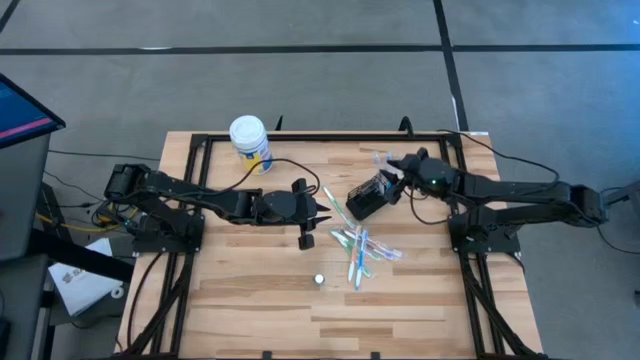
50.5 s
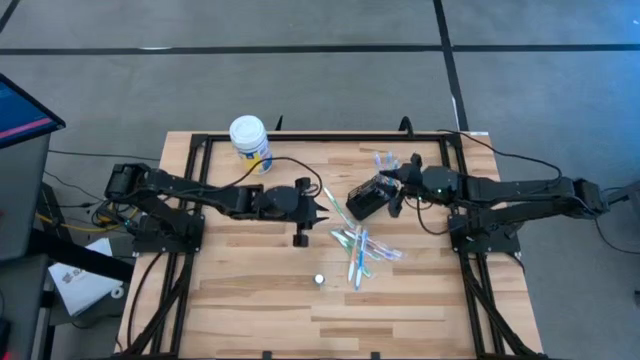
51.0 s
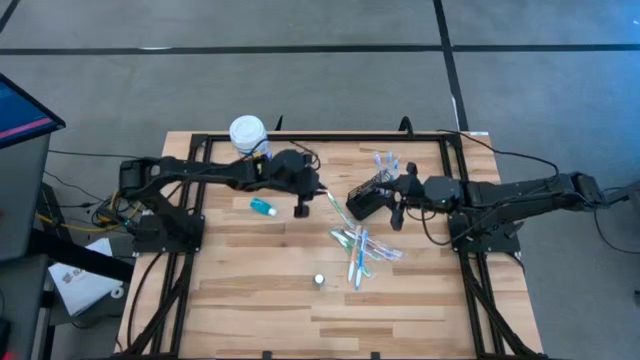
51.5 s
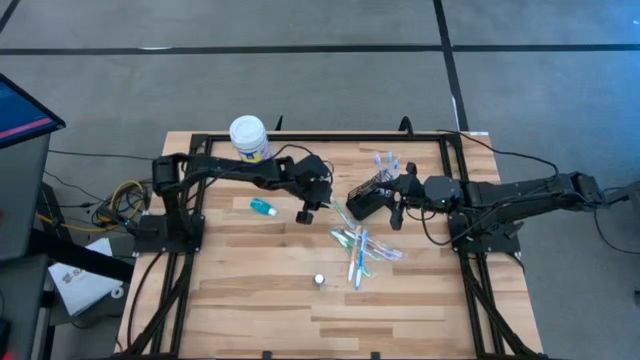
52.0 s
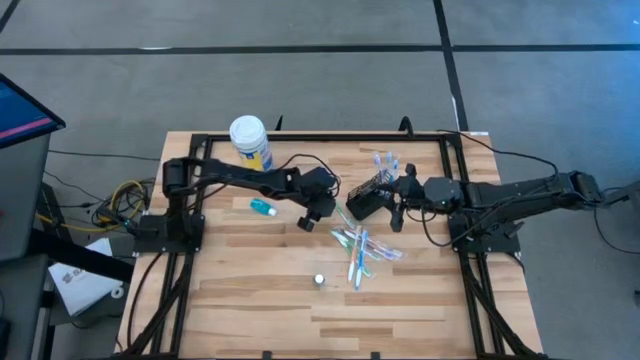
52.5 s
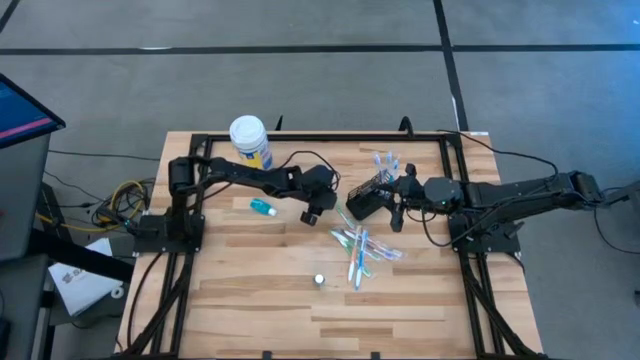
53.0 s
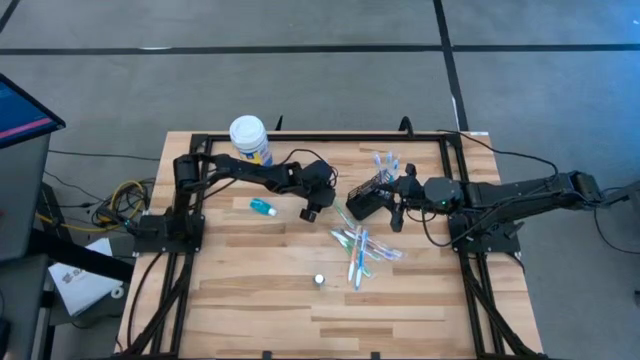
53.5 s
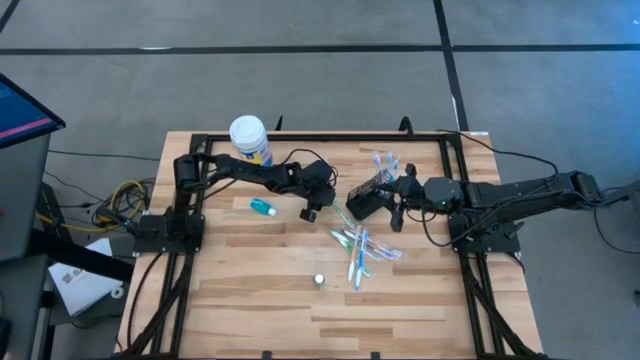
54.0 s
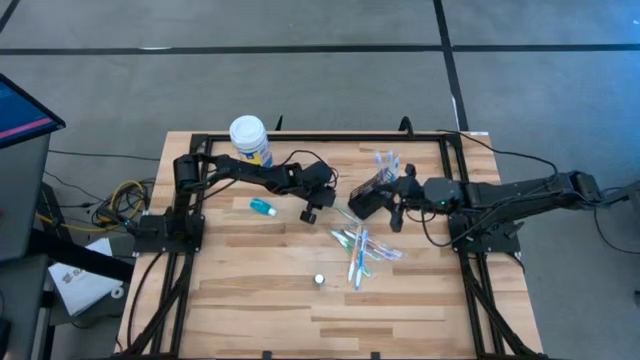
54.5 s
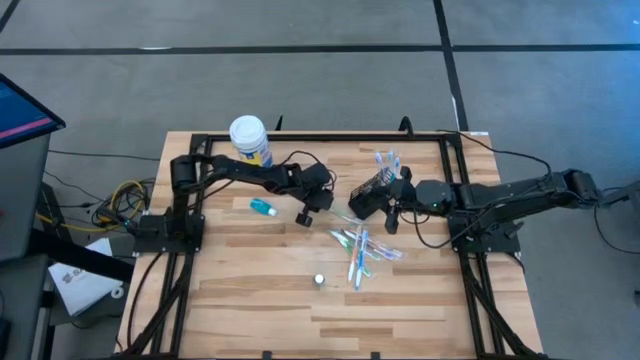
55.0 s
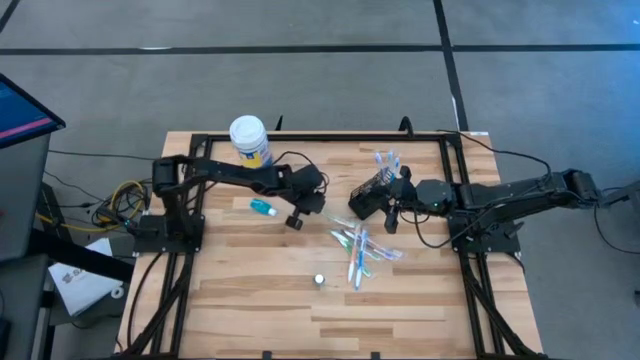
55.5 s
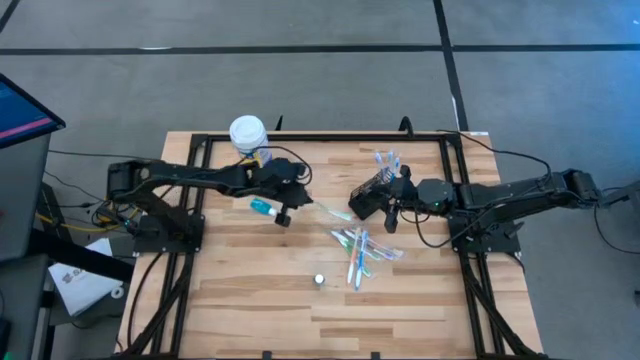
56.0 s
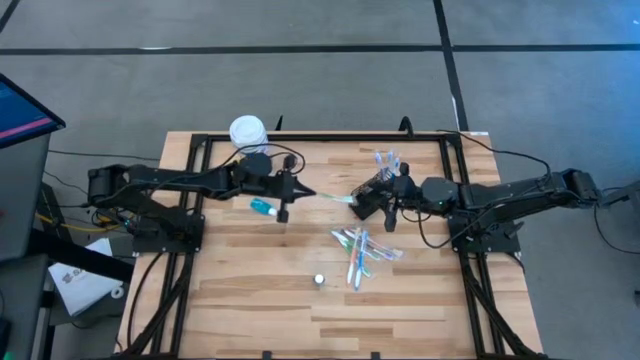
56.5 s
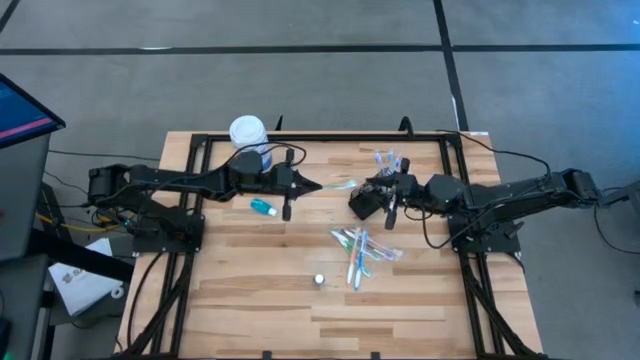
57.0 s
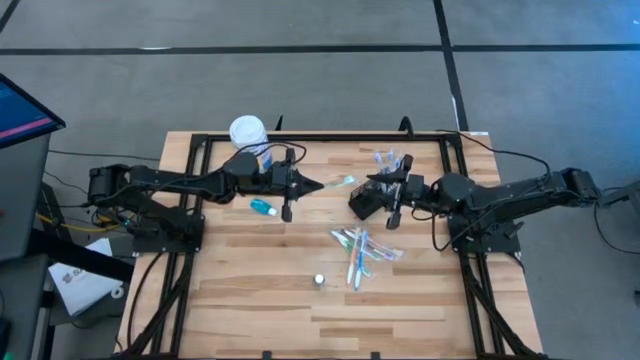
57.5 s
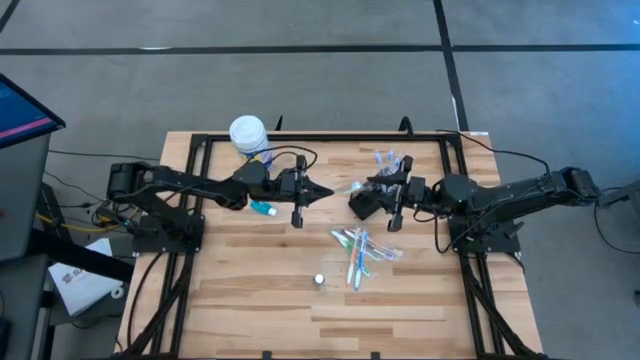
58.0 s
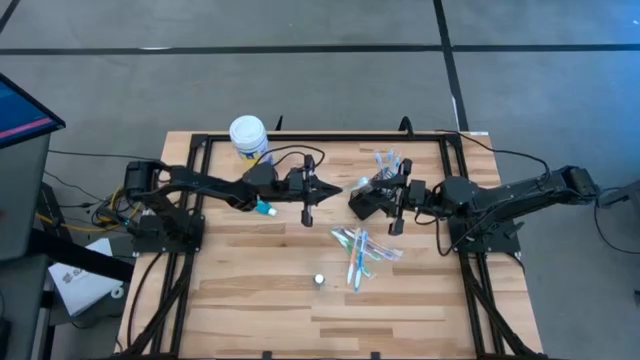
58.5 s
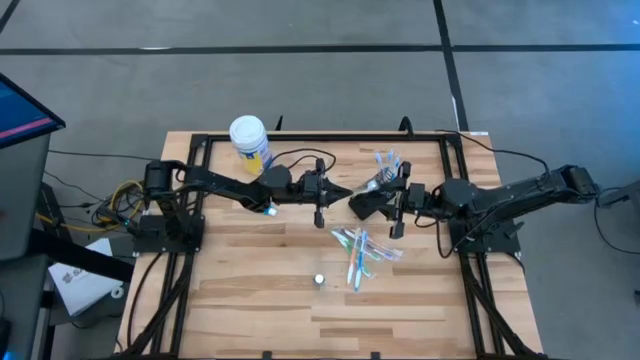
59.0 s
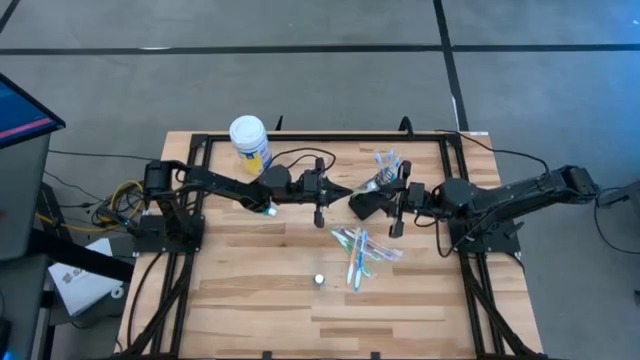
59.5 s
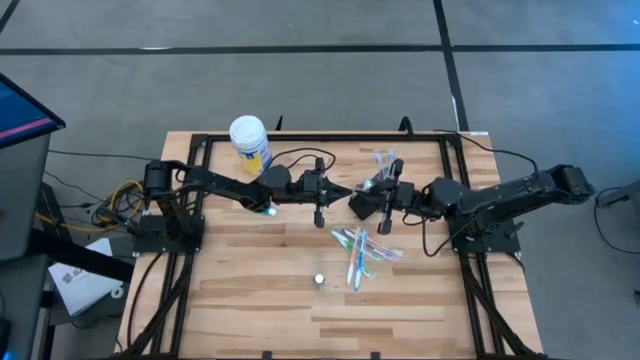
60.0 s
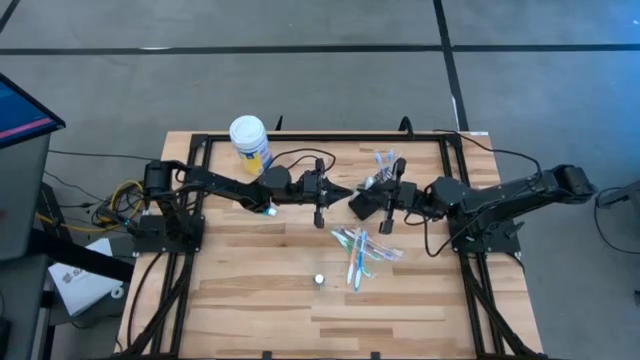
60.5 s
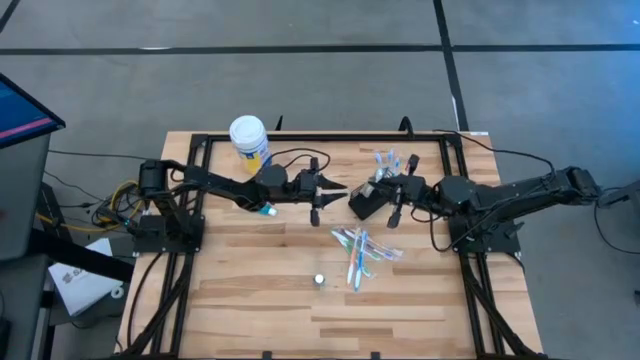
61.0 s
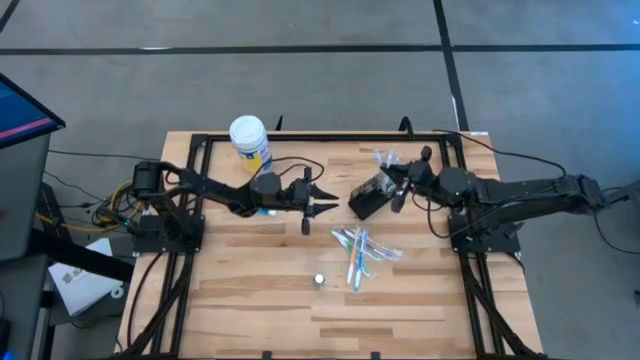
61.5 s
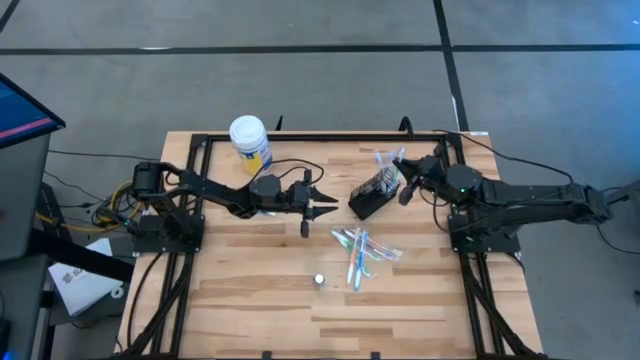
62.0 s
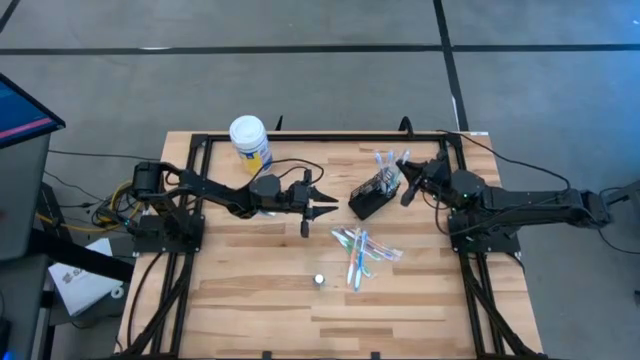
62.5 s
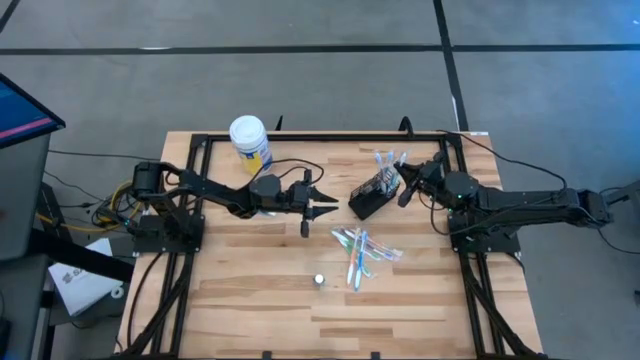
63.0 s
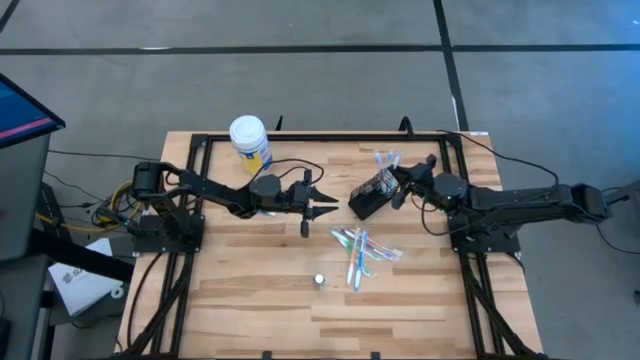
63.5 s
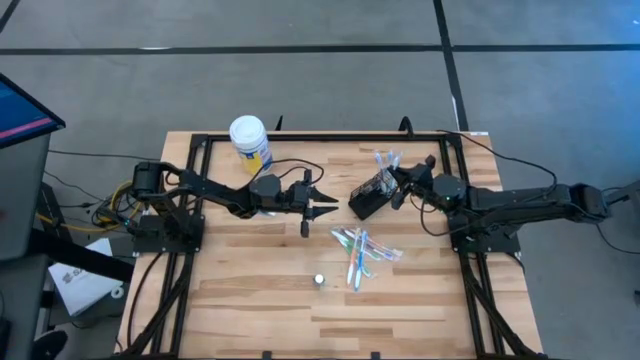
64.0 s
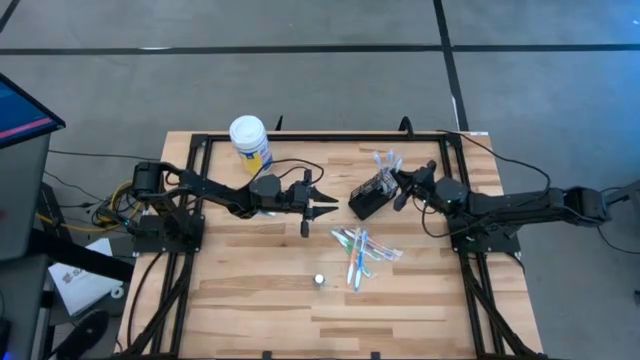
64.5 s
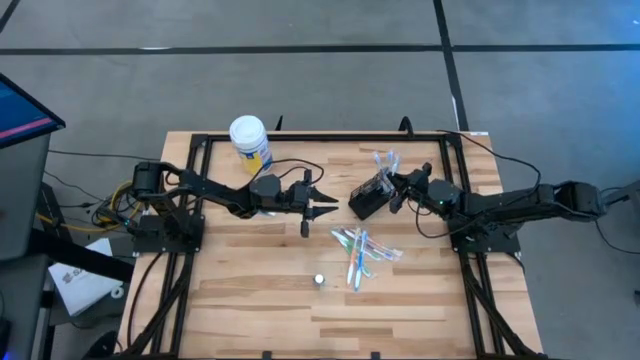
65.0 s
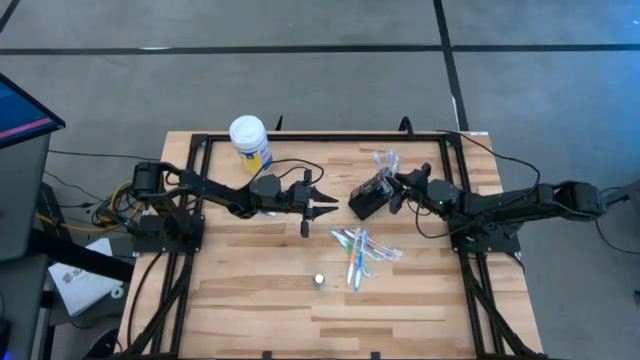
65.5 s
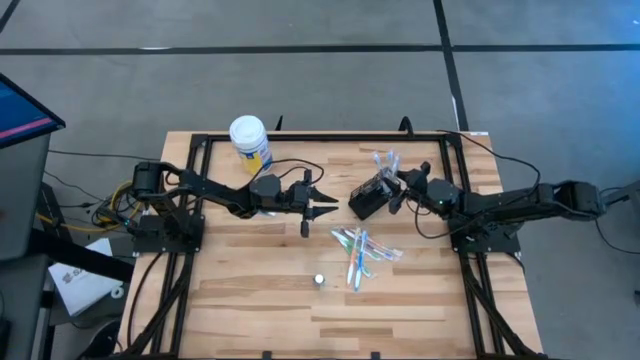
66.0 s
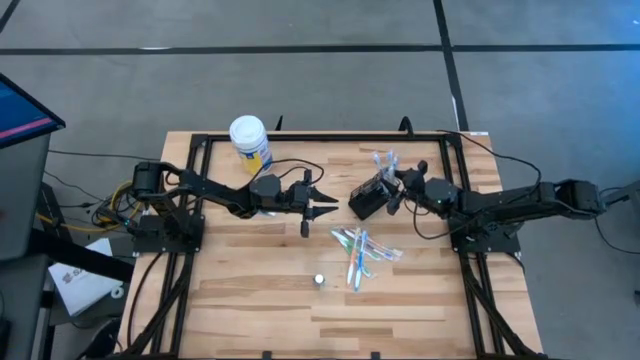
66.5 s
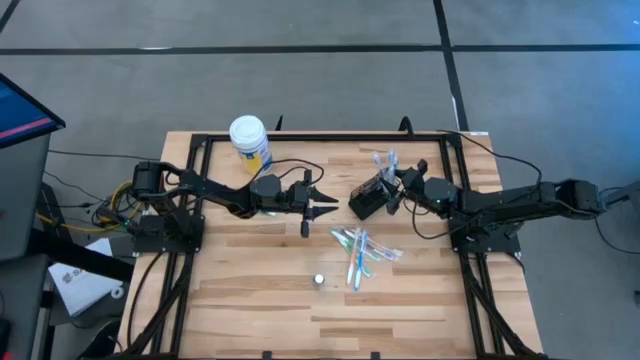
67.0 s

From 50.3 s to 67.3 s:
Task: Pick & Place toothbrushing station
Put the green toothbrush into the mesh organizer

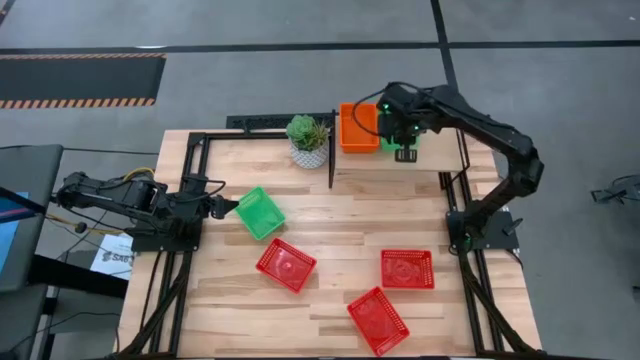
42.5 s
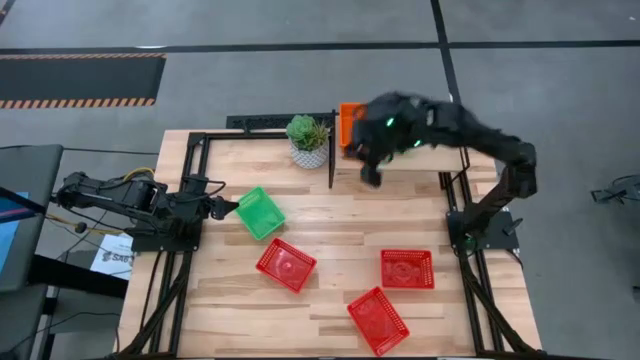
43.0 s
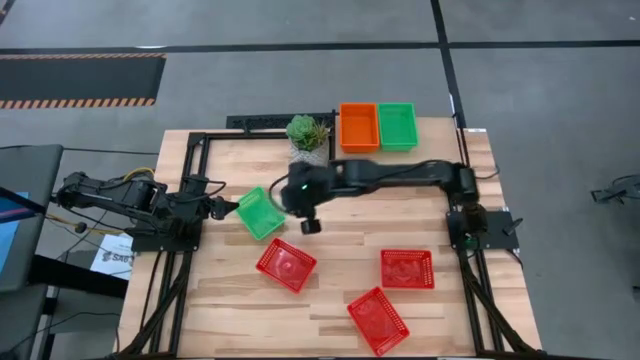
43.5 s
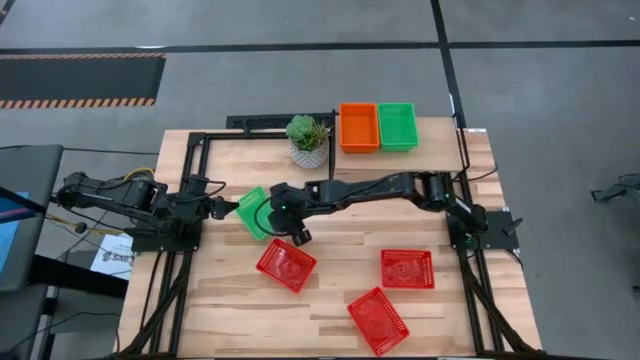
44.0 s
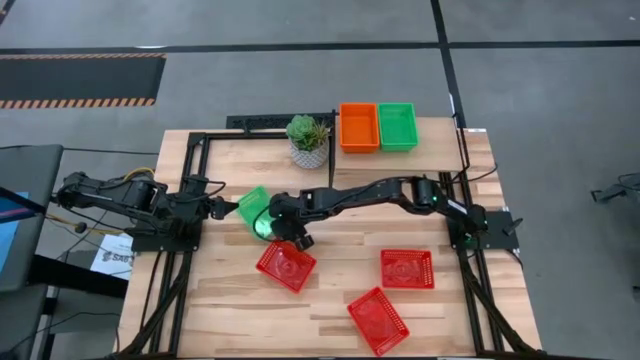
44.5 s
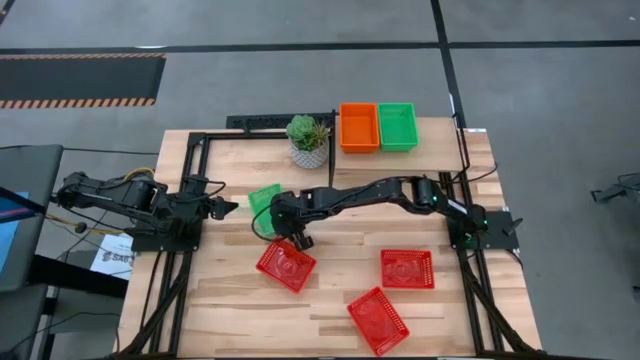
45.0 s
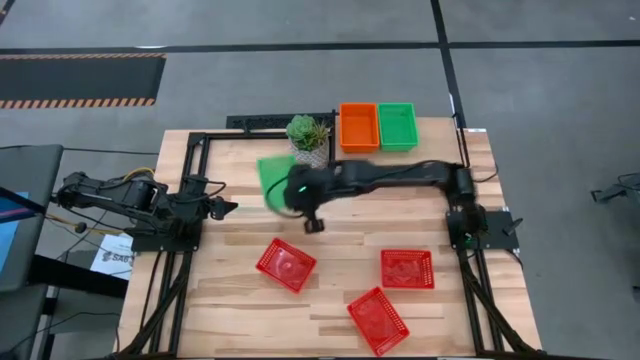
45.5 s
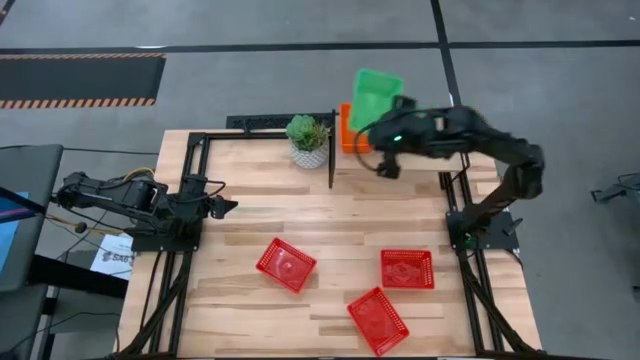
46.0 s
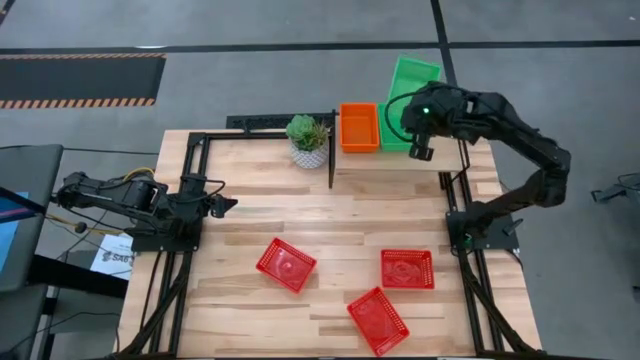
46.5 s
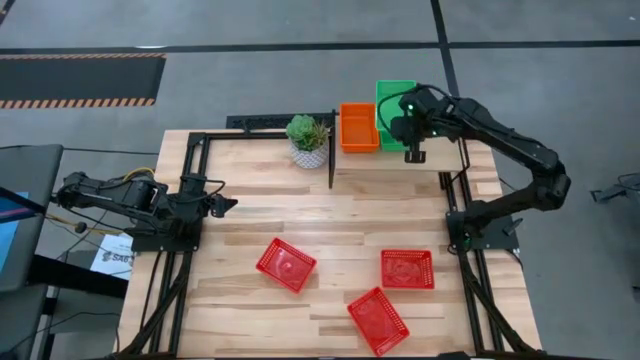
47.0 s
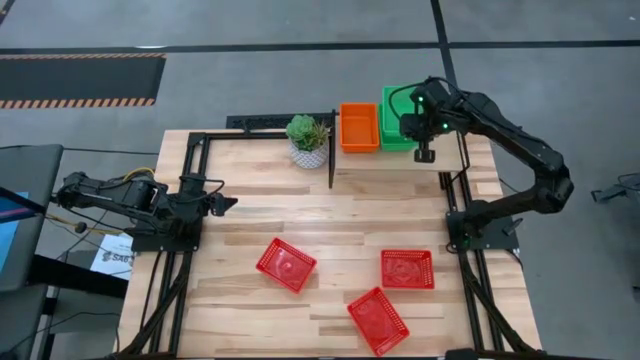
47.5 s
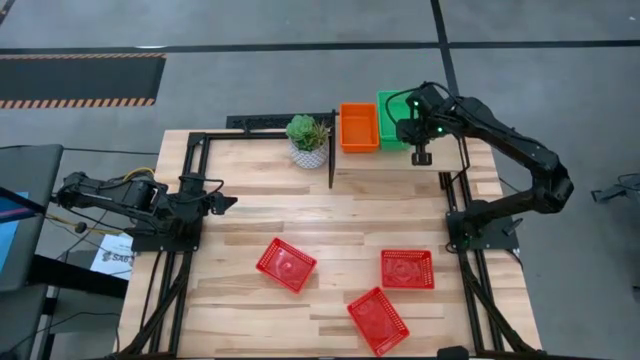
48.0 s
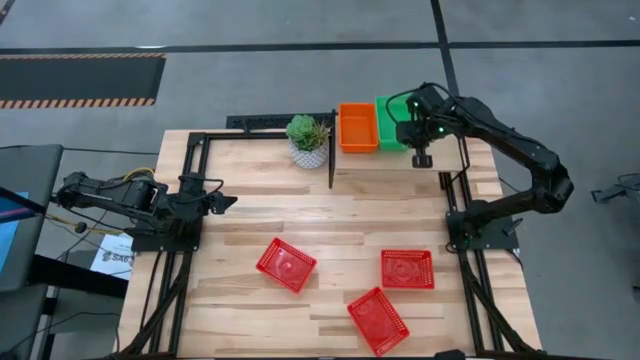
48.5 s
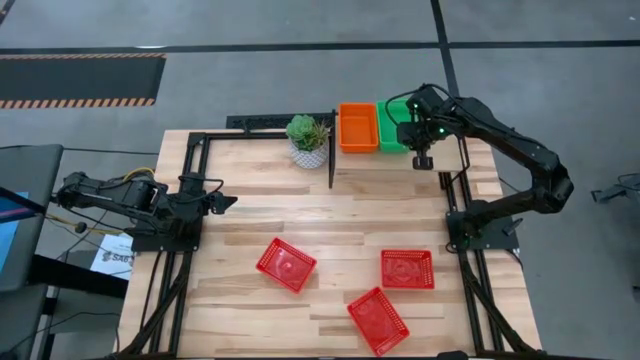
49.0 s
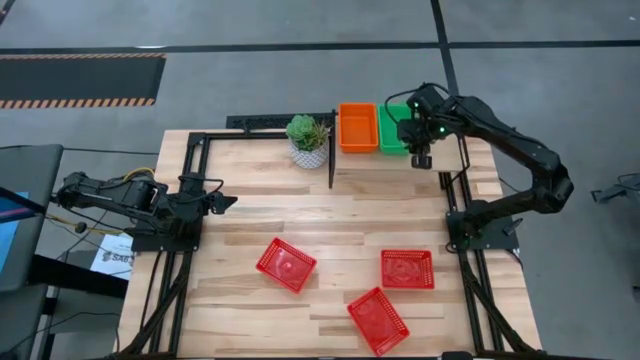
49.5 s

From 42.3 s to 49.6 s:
Task: Stack baskets on shelf by color
Stack the green bin on the green bin on the shelf
